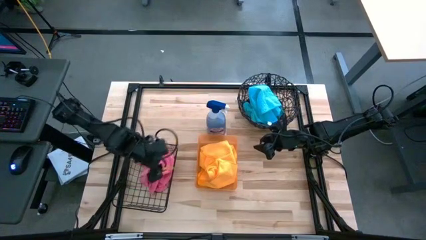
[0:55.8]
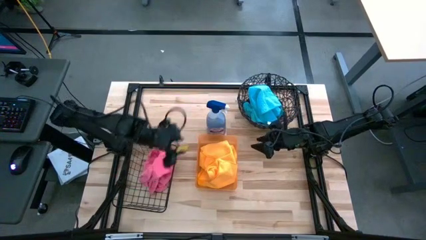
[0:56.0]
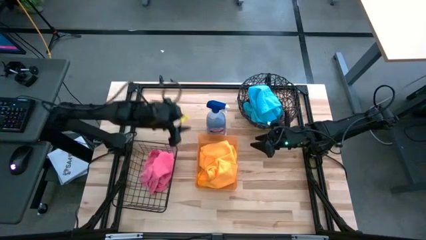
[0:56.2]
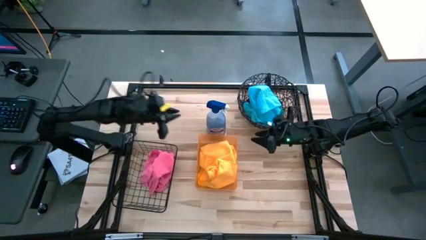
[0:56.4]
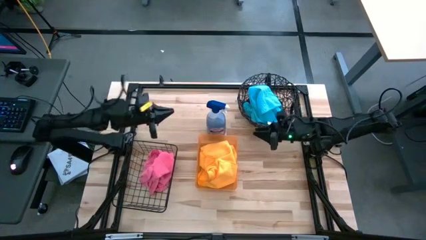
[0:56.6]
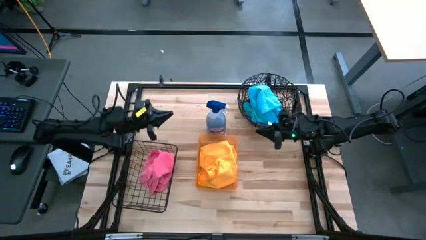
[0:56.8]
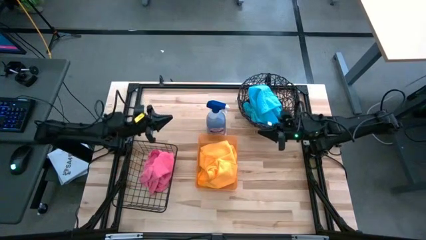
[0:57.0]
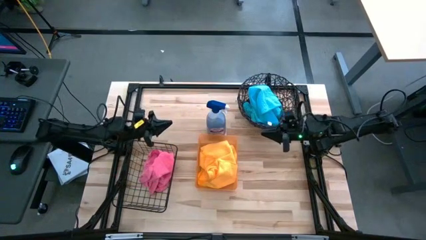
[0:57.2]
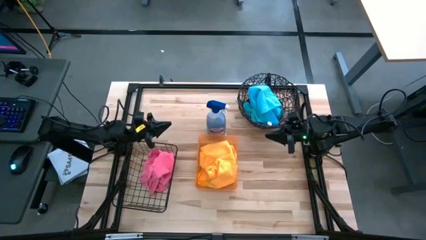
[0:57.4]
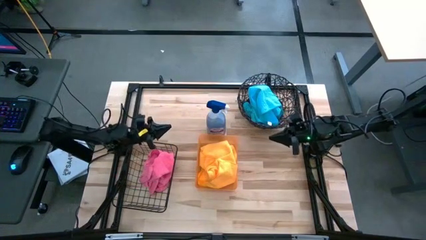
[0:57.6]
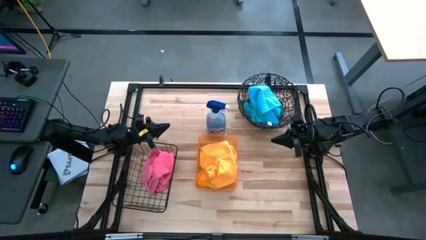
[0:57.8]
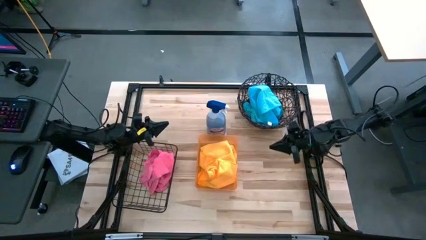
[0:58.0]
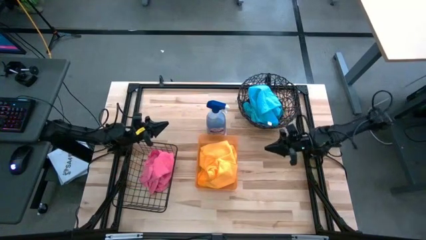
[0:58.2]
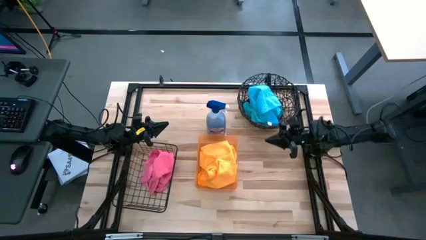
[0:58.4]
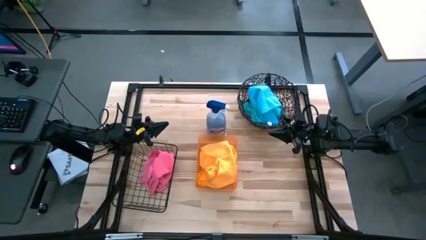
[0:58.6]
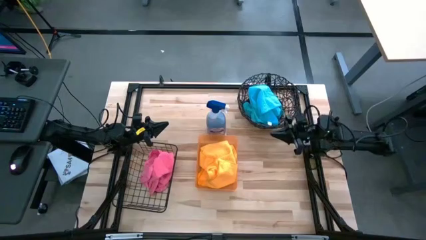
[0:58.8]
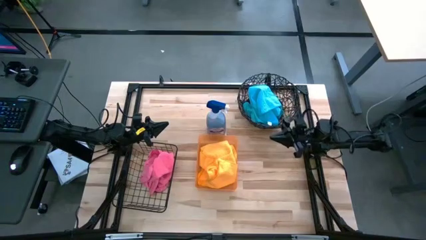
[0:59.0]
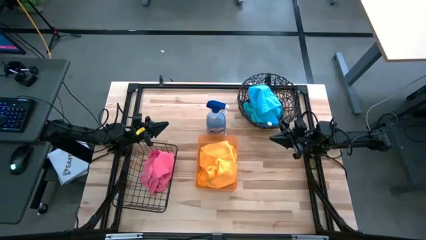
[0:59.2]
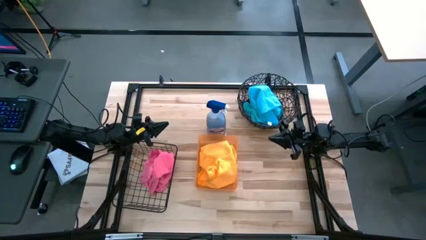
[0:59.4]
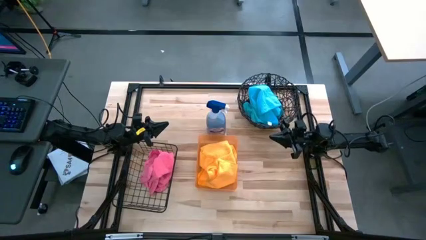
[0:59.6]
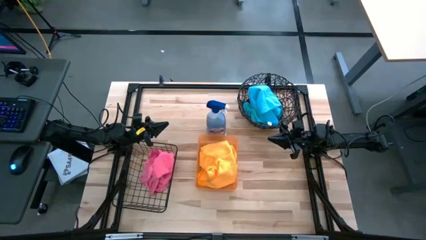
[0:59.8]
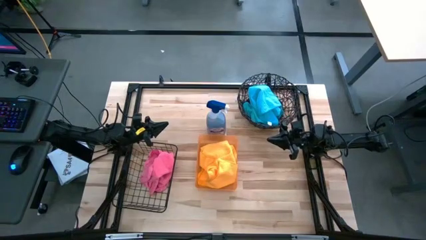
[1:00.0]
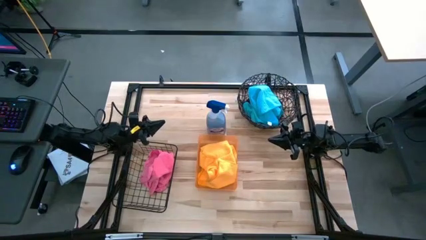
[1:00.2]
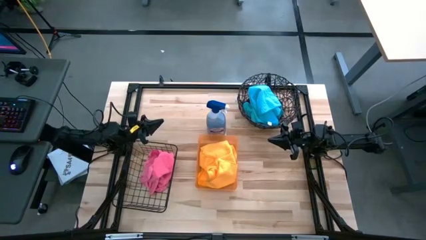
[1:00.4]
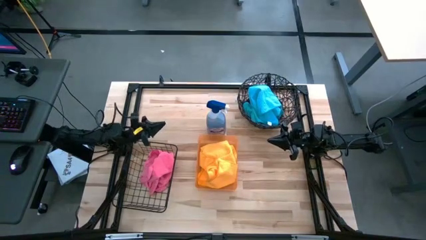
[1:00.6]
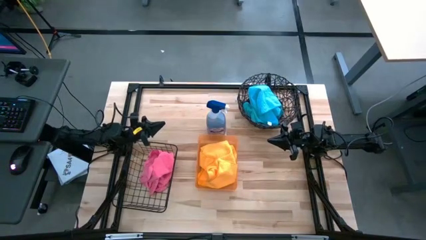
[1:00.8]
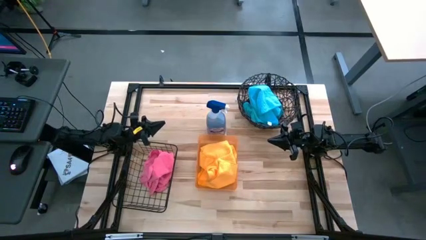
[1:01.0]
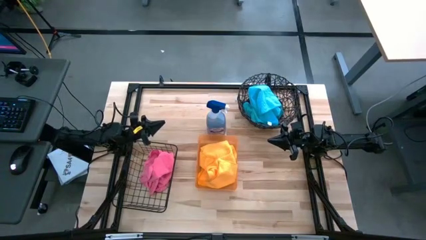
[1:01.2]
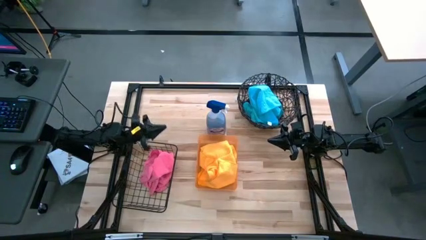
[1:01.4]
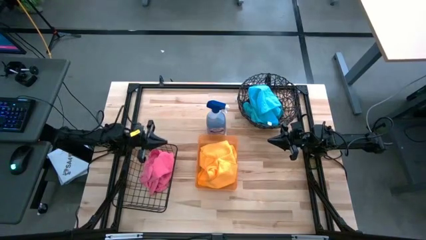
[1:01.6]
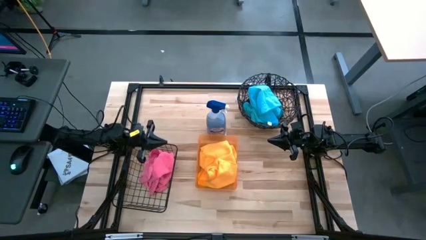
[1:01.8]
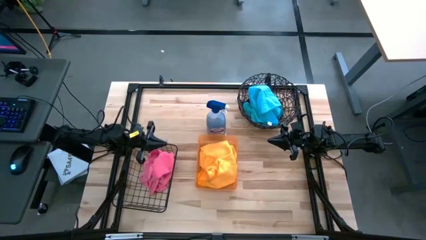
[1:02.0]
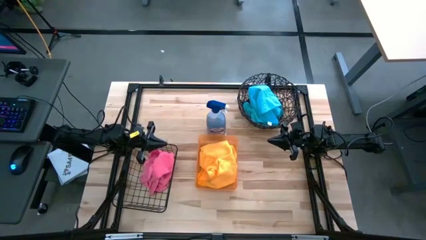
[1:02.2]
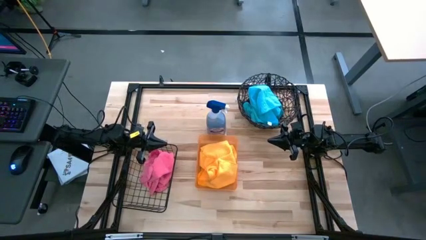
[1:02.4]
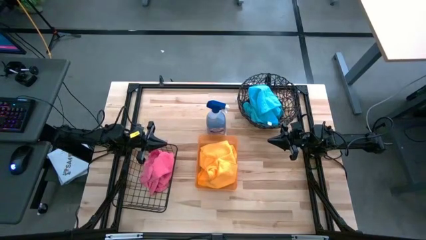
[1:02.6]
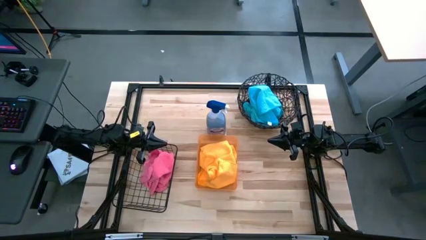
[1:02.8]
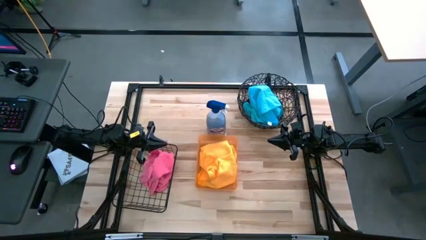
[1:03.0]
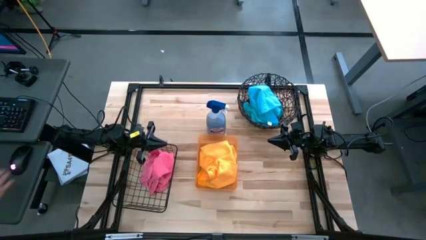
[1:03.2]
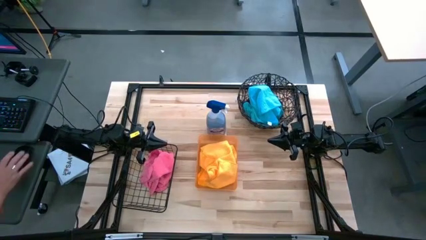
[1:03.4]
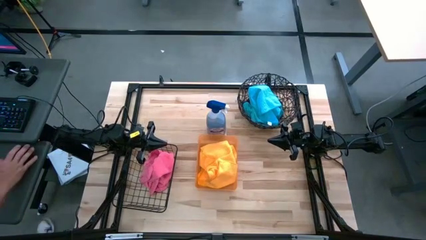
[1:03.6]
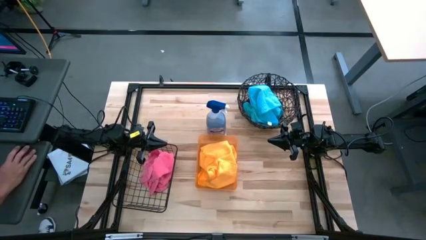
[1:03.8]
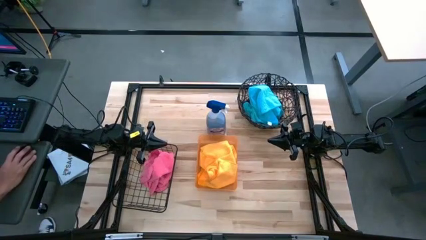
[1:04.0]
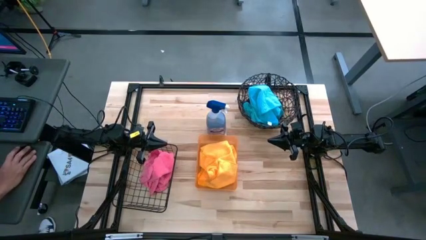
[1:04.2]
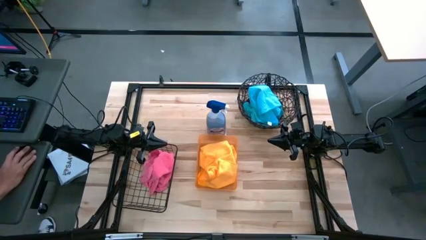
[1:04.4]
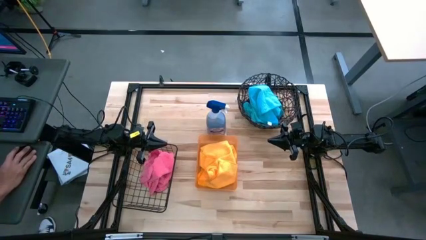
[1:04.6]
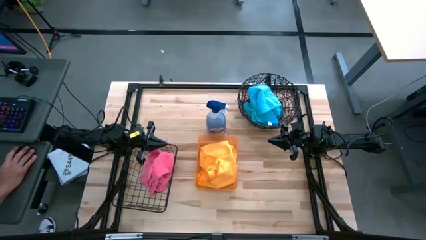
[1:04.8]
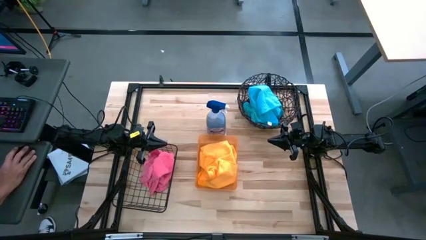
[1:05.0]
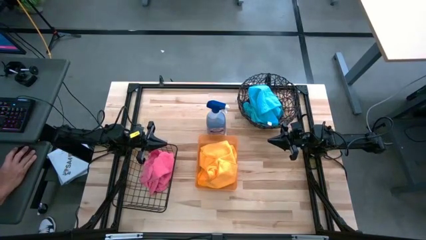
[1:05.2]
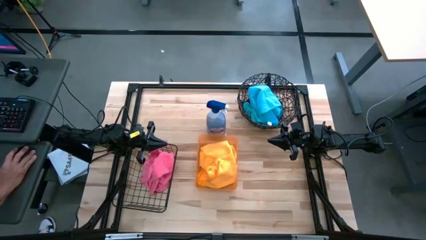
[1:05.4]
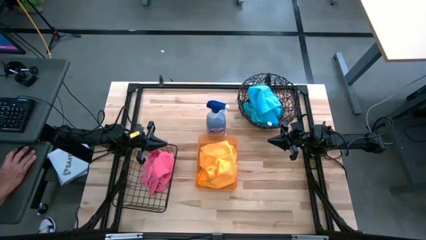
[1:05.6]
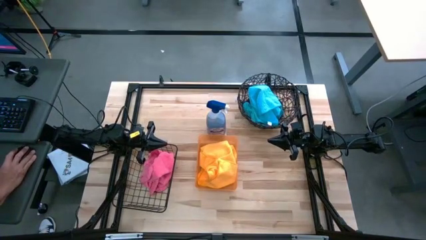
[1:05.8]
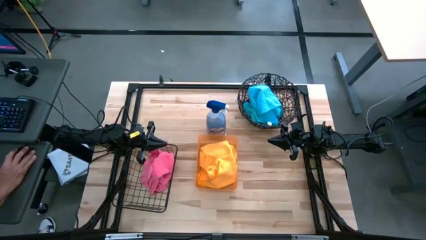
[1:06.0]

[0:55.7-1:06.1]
Task: Sort microfiber towel by color & place in baskets
Return to Home Position

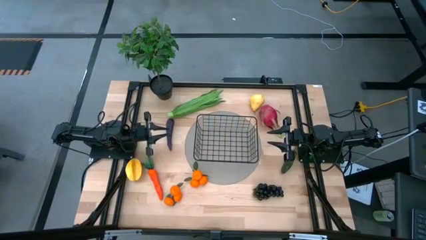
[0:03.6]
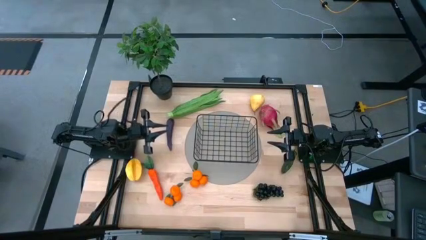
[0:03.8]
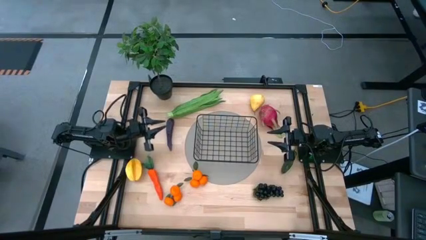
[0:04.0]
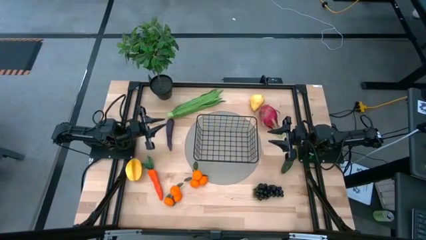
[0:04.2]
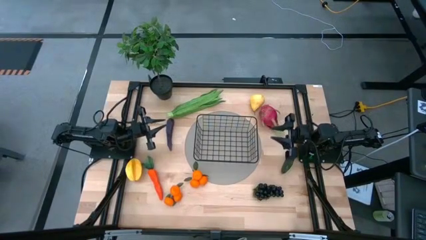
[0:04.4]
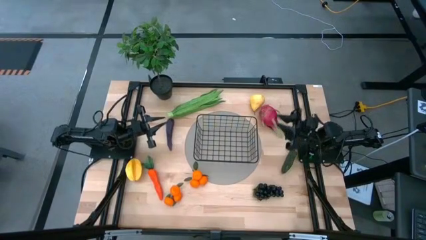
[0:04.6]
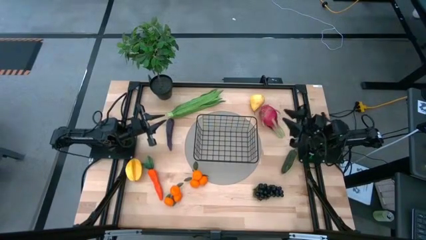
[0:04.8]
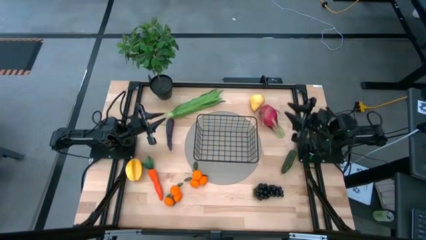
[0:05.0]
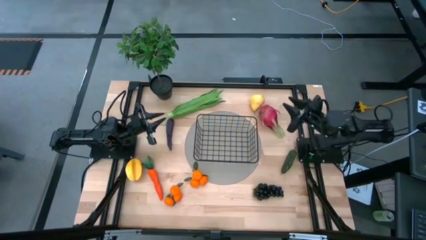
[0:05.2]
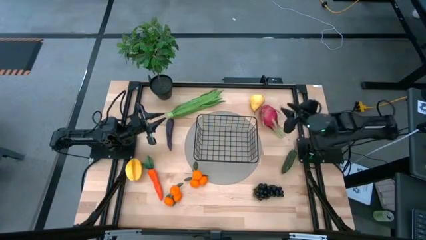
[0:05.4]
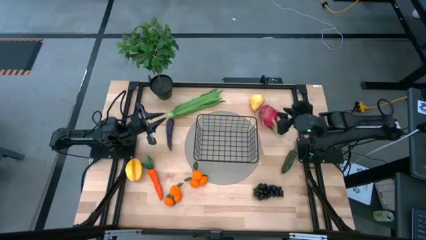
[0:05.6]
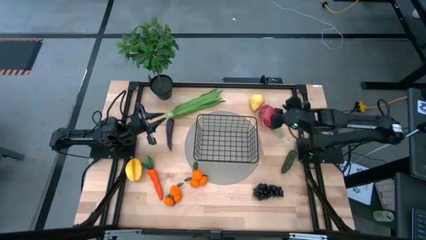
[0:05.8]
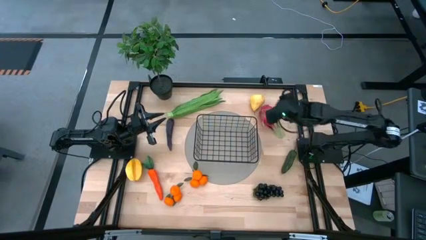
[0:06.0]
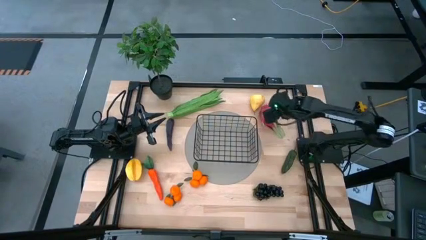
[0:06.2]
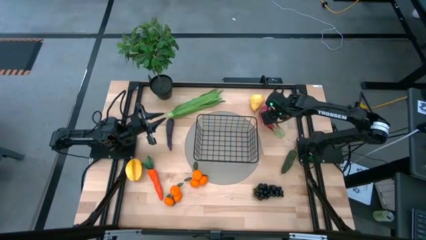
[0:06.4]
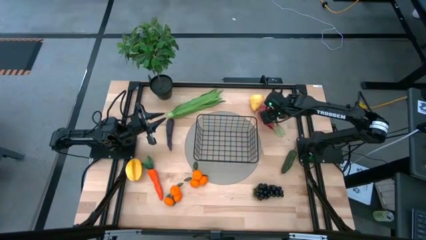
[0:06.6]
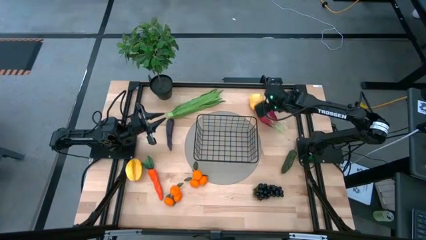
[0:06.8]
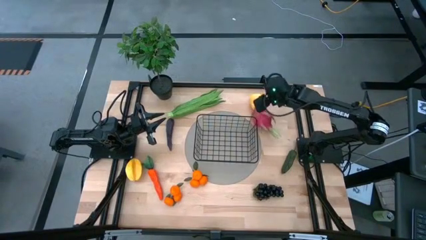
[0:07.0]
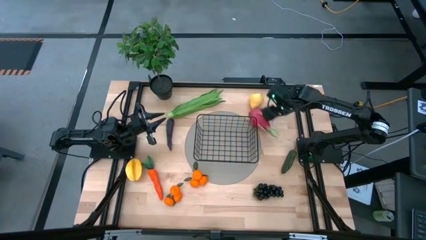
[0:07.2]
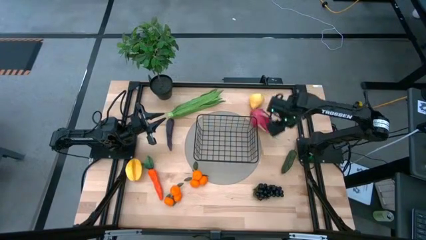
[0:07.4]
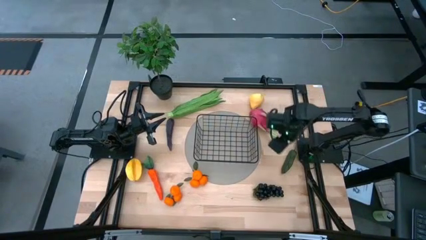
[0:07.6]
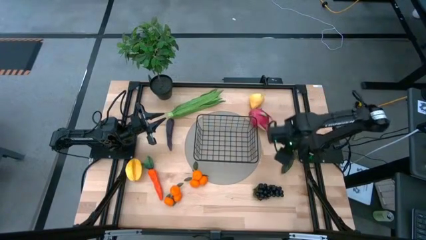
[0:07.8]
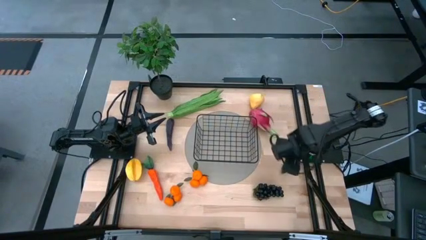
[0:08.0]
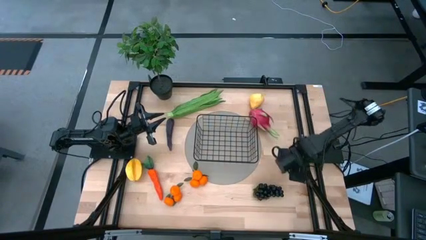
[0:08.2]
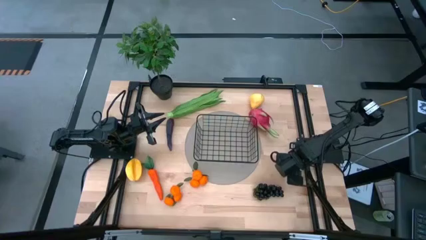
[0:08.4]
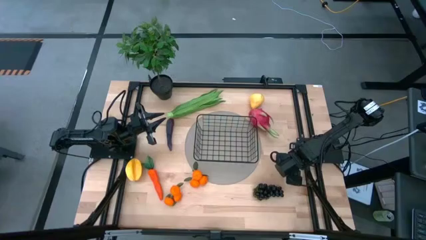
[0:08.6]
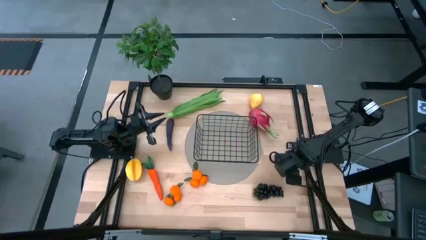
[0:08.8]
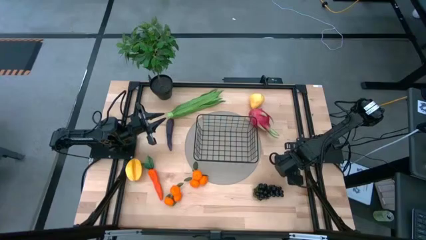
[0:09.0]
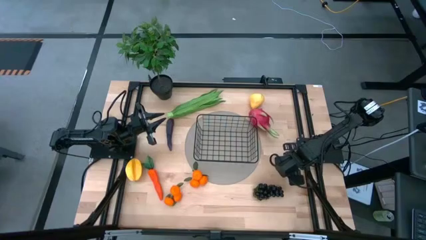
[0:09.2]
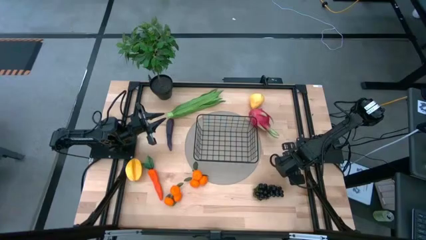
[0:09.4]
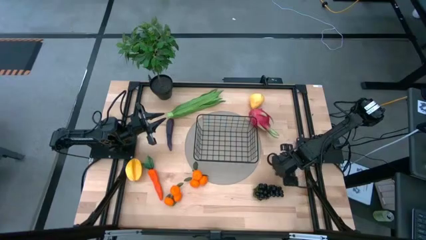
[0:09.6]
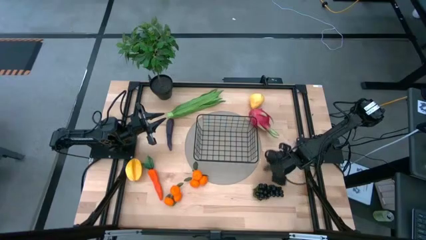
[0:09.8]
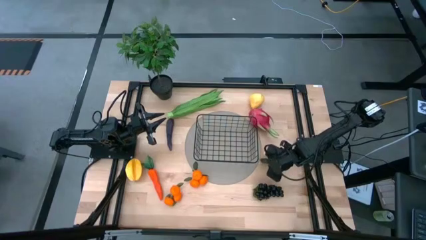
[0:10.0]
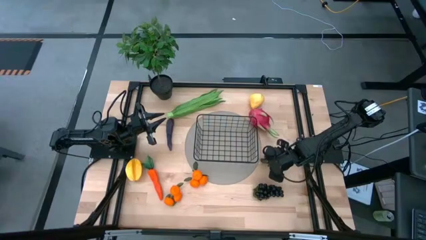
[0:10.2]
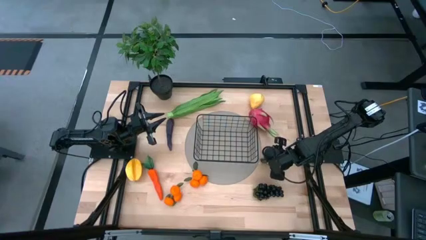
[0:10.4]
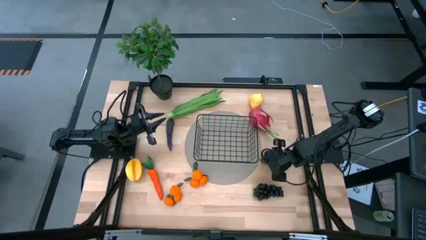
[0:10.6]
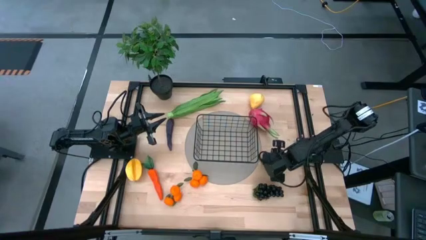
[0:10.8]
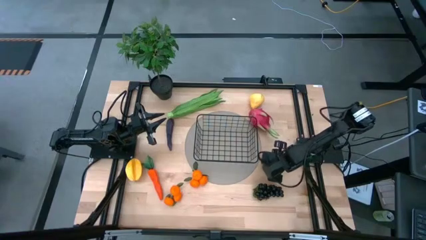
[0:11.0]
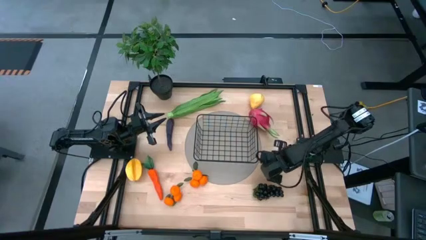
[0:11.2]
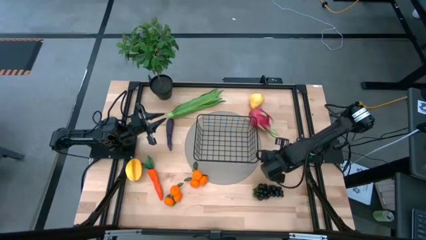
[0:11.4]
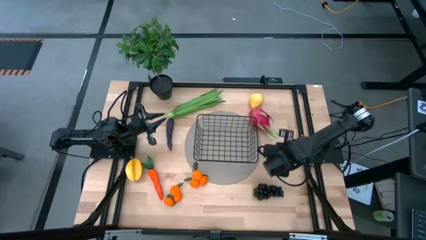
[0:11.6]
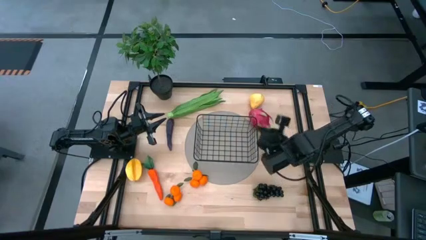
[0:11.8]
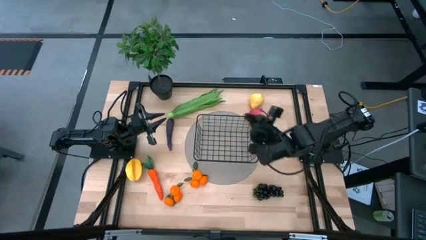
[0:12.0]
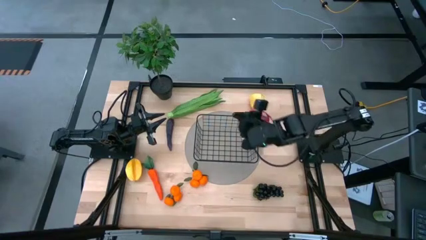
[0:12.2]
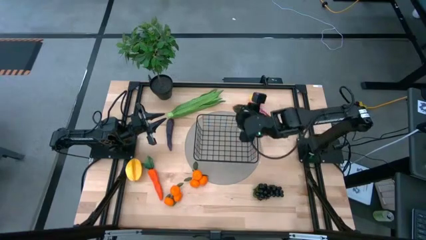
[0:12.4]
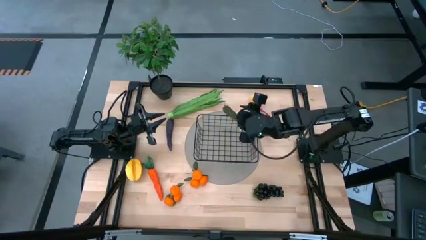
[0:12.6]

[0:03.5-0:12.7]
Task: Build produce basket
Put the green chilli pepper into the black wire basket
